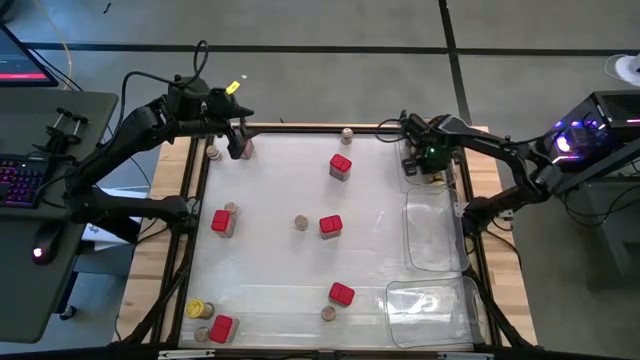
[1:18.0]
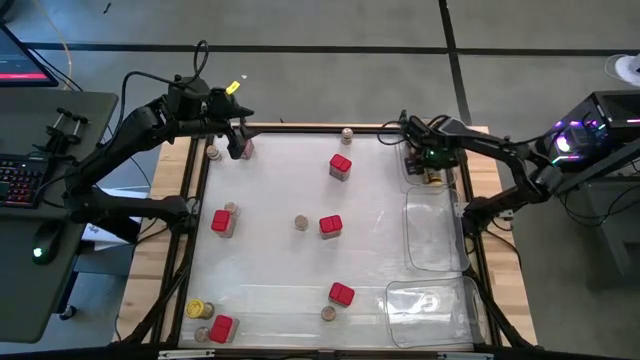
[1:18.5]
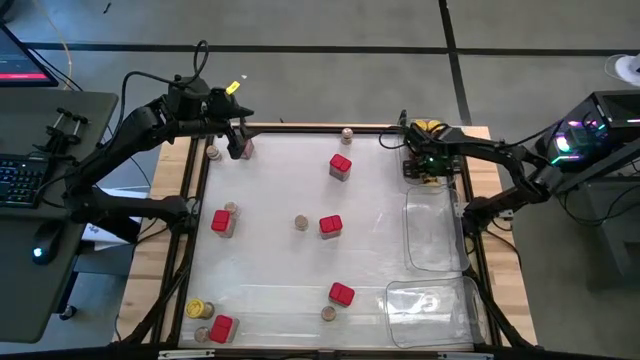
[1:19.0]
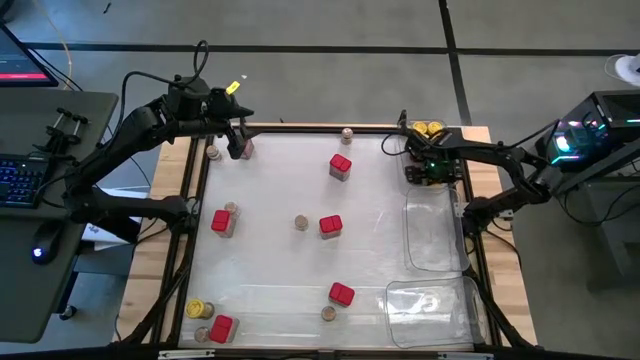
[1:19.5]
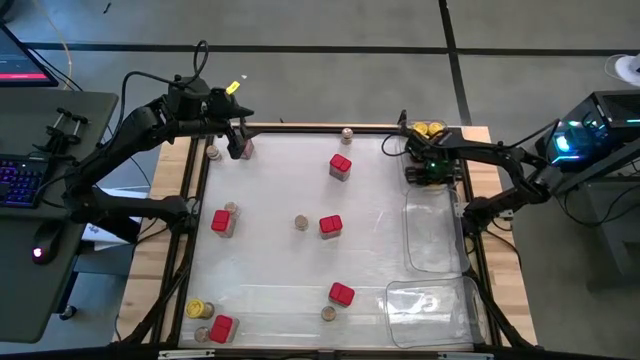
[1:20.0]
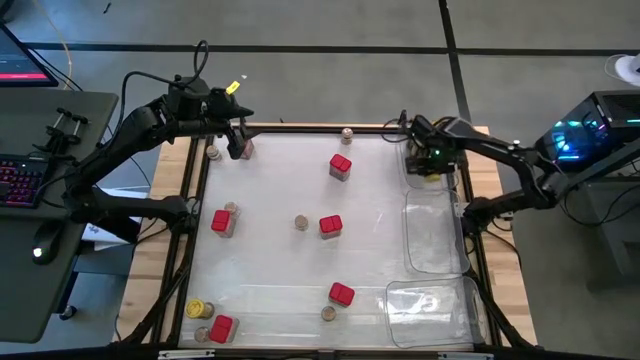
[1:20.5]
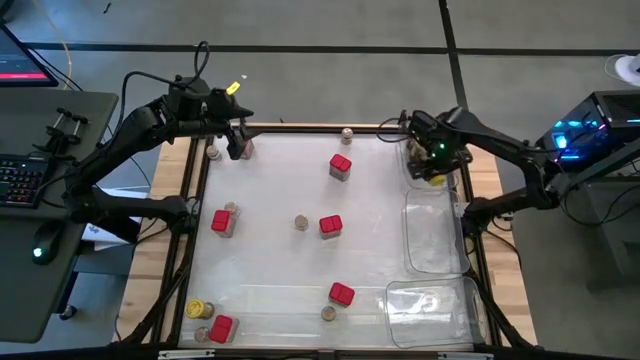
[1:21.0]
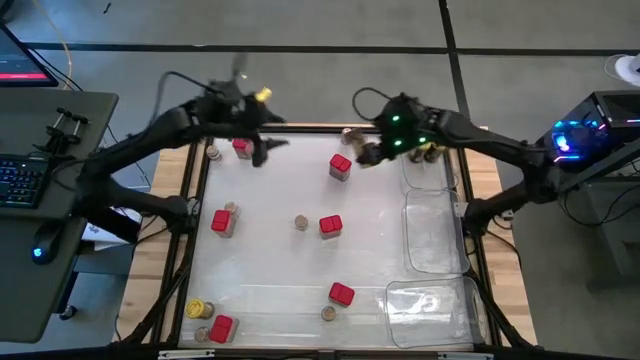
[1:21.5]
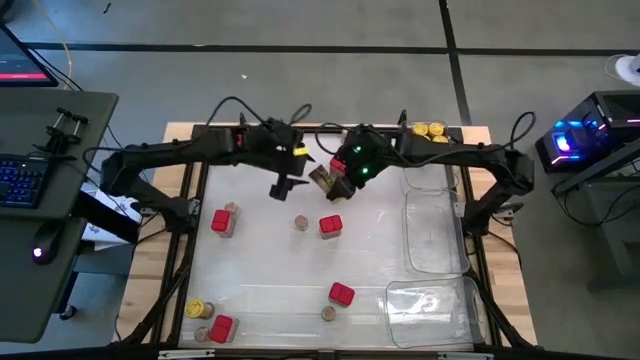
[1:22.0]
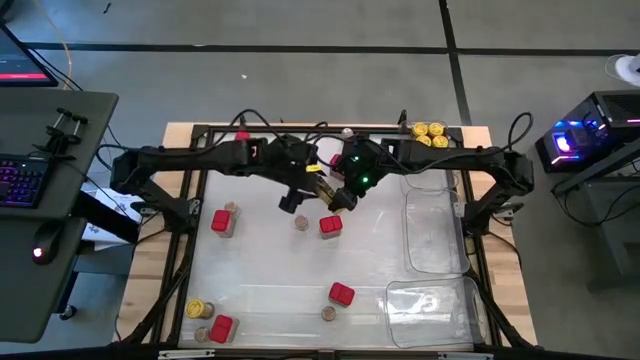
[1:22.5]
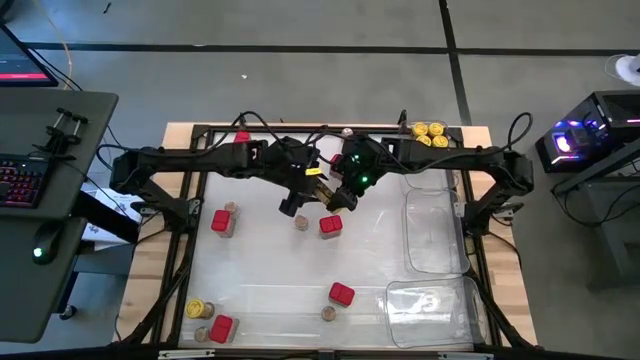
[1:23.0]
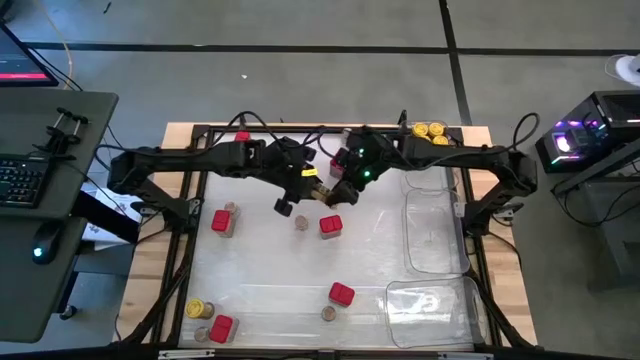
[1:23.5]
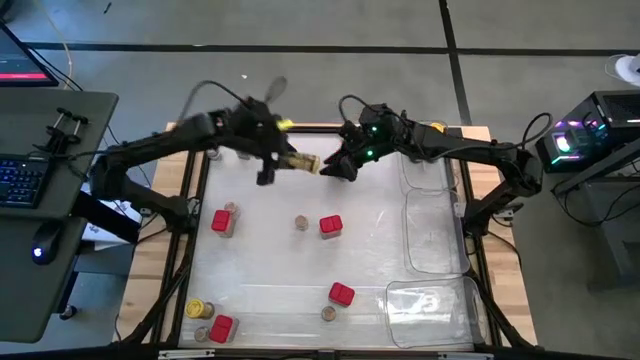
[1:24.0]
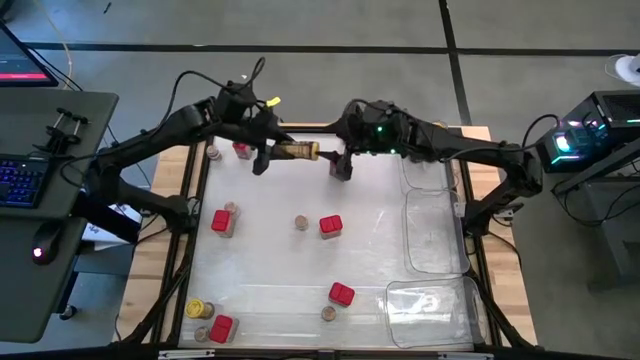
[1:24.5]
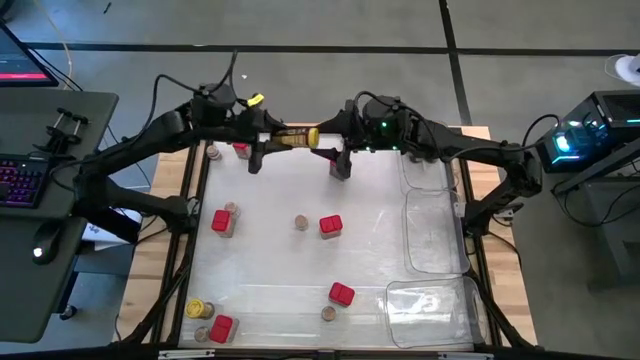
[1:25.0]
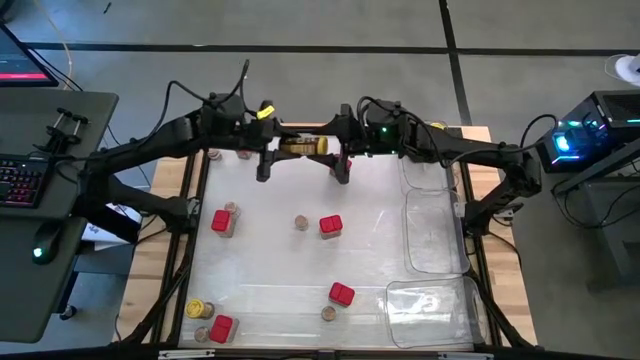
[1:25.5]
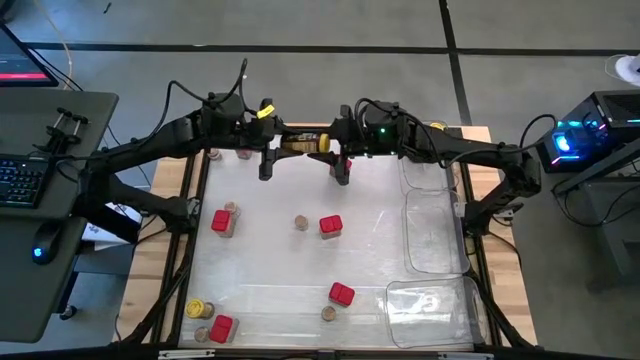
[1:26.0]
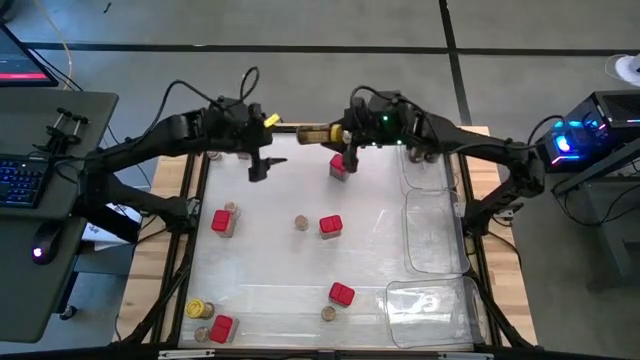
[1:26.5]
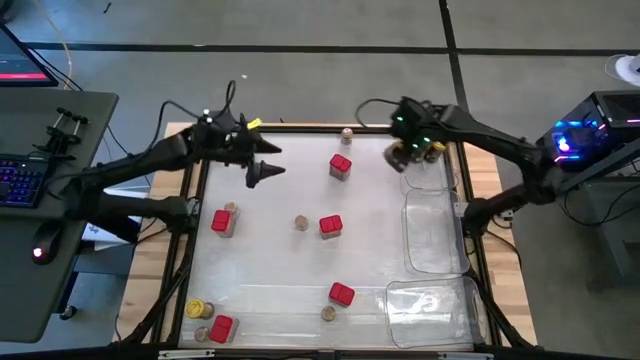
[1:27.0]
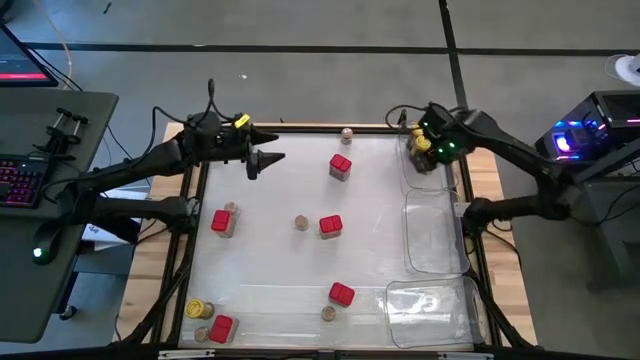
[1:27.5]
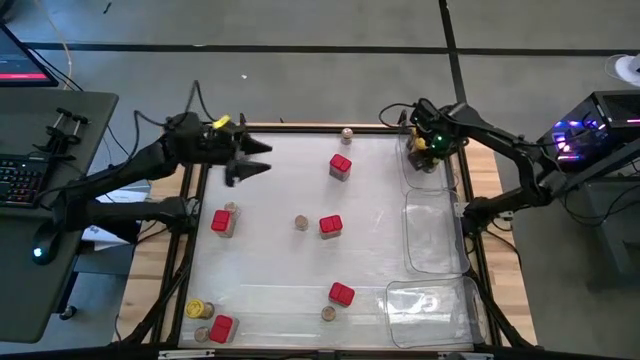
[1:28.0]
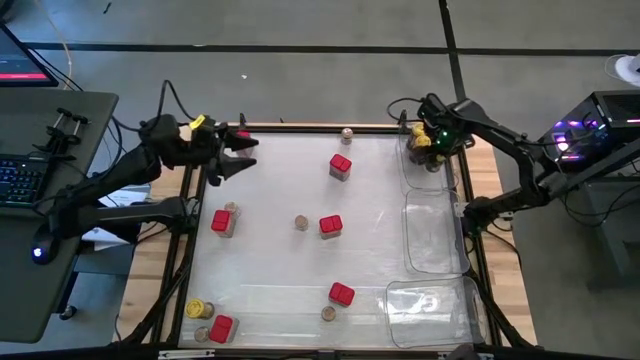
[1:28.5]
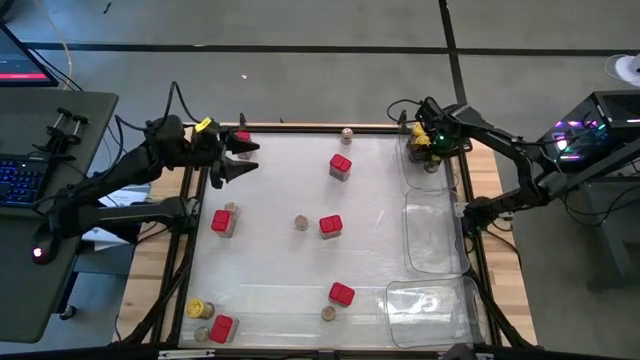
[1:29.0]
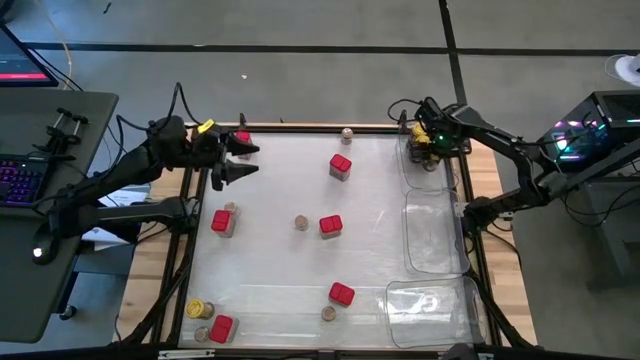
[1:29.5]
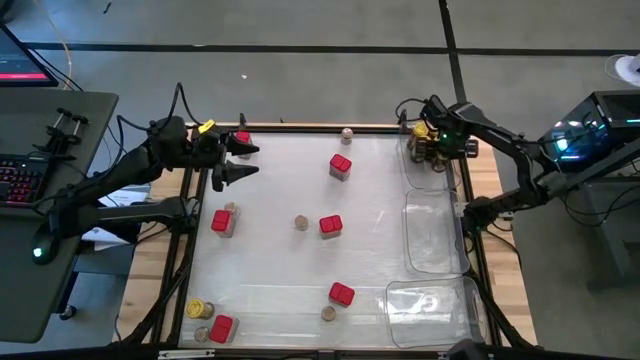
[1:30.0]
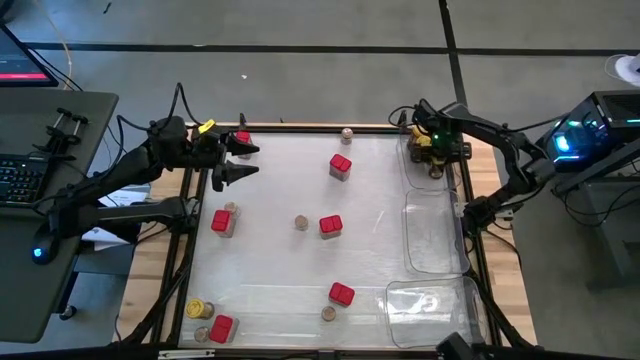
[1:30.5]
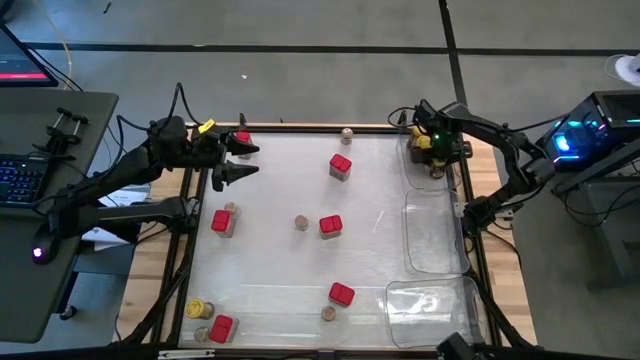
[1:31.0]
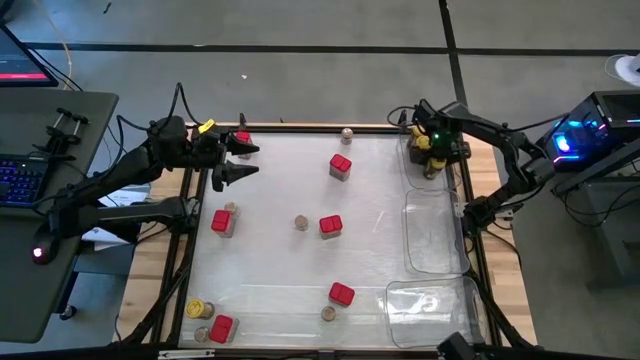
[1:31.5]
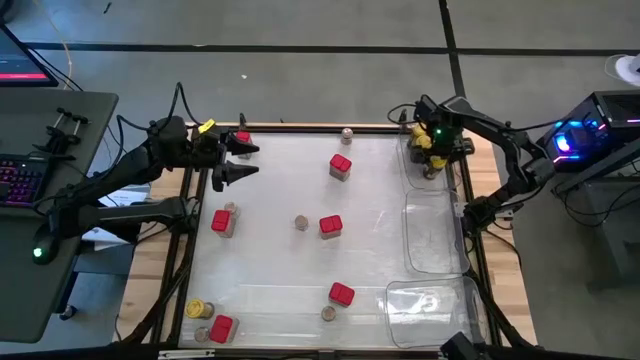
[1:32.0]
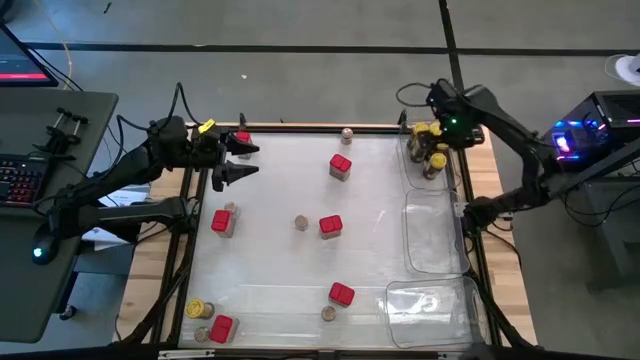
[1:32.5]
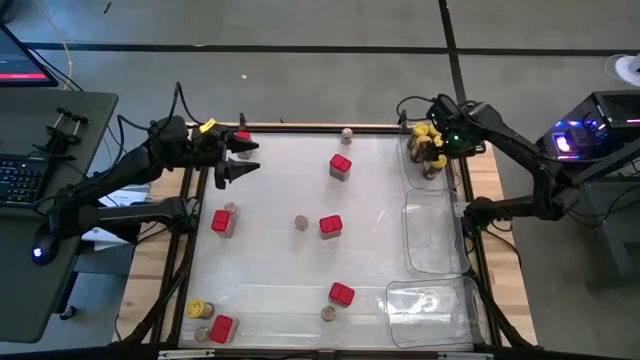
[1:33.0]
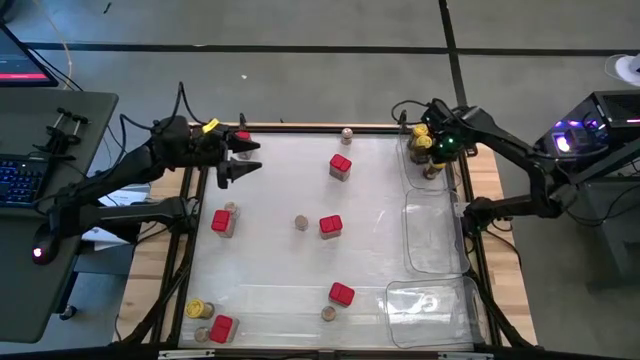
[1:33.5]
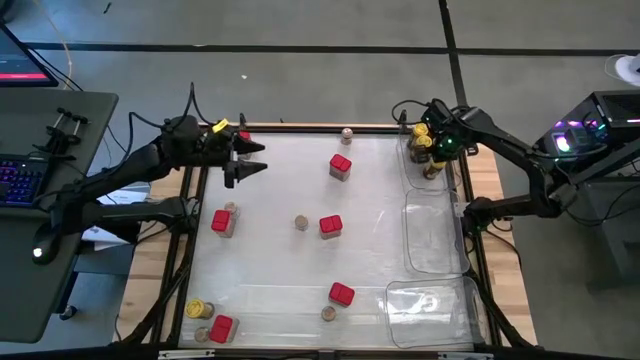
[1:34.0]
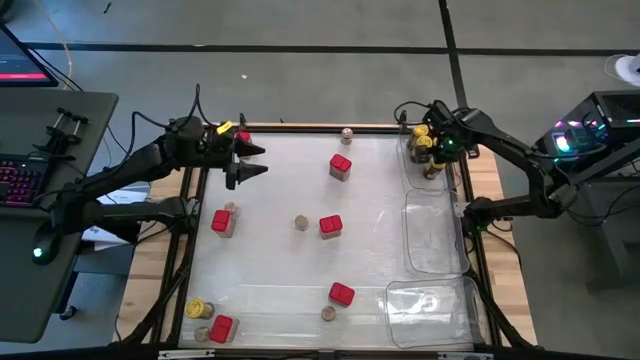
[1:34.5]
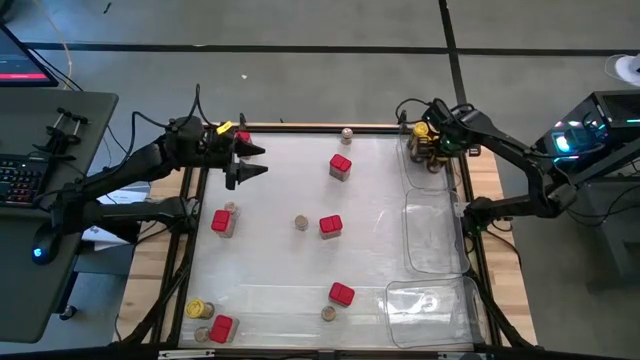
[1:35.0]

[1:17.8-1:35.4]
Task: Sort spices by type
Put the yellow seasoning bottle into the top transparent bin

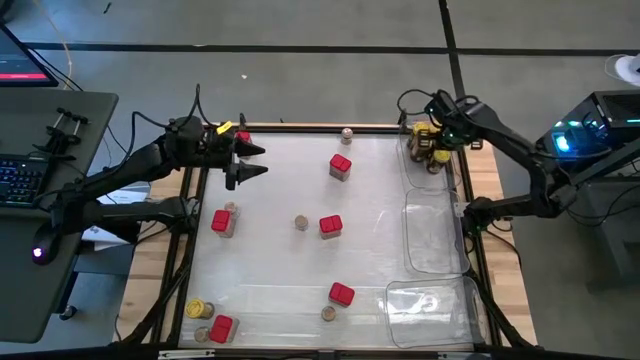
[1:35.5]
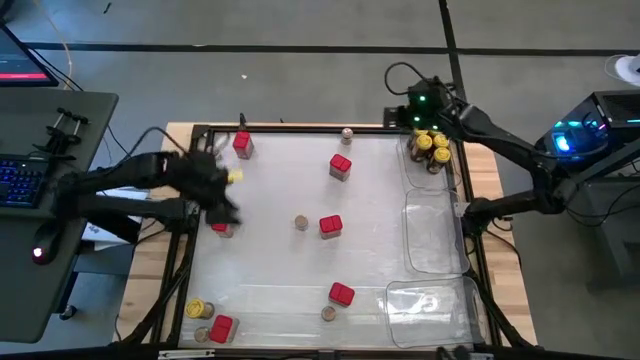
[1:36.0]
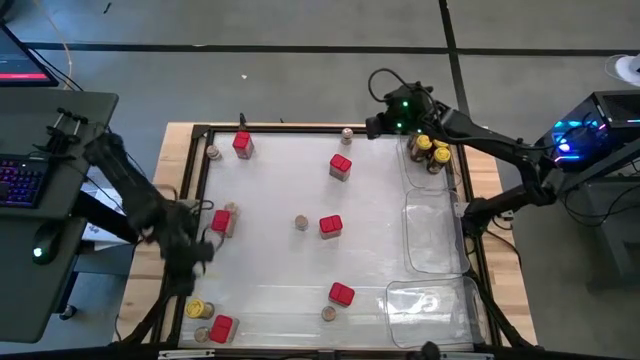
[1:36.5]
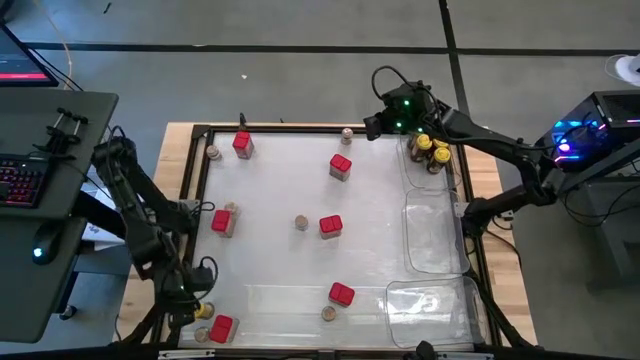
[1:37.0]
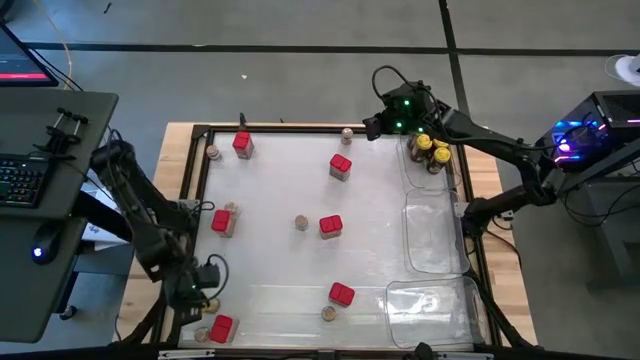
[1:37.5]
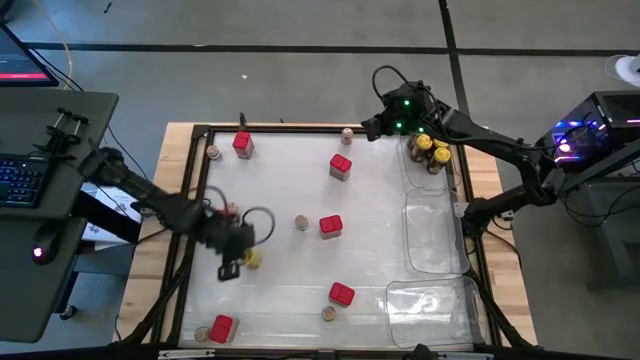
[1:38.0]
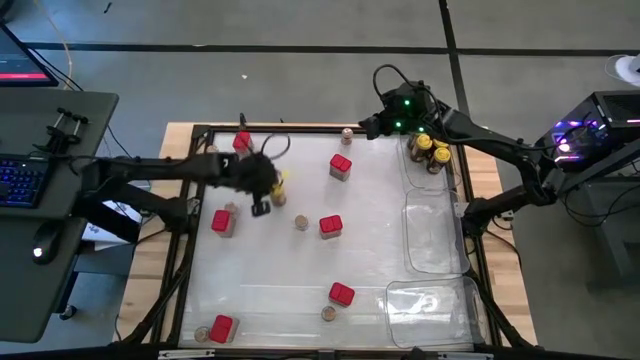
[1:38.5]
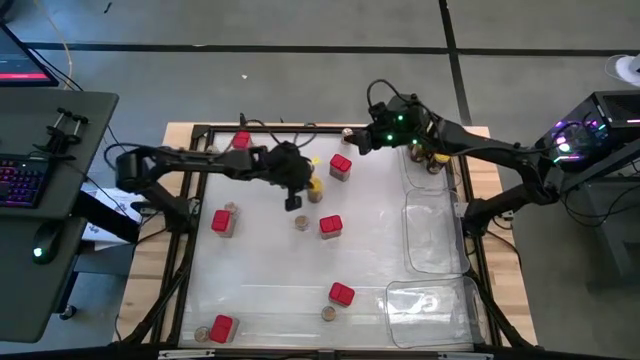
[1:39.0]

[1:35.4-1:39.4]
Put the yellow seasoning bottle into the top transparent bin
